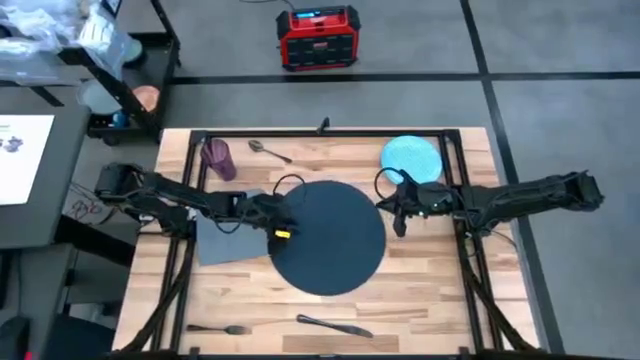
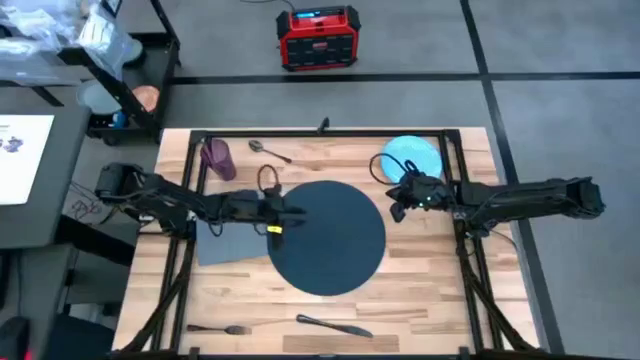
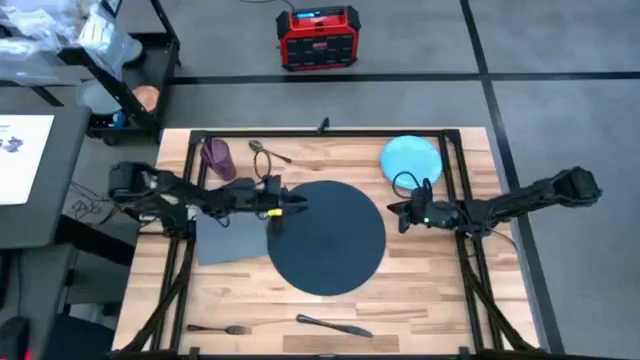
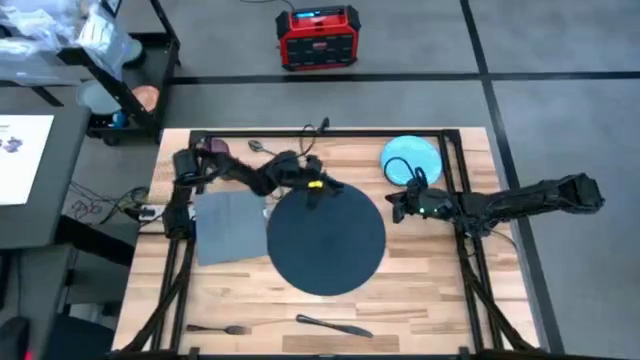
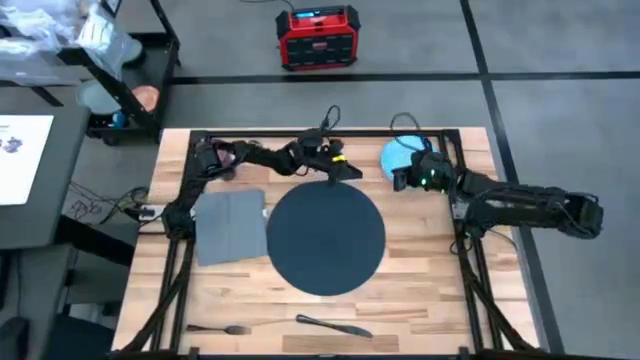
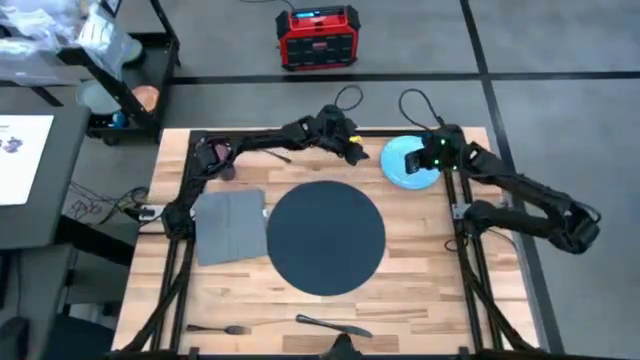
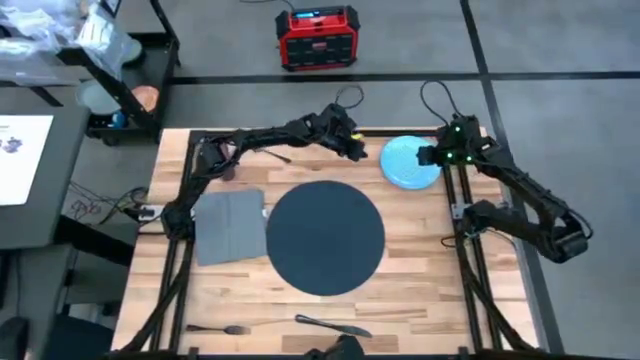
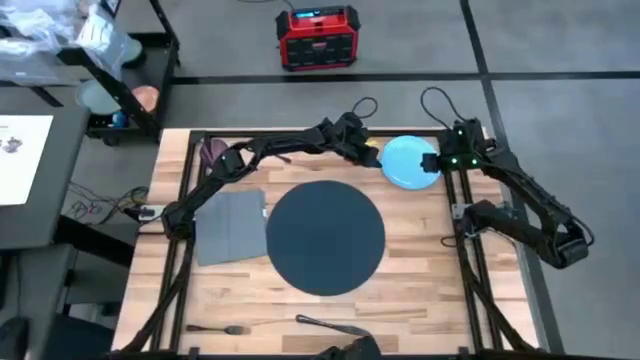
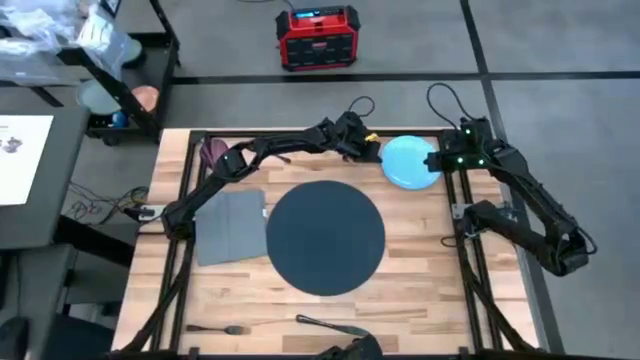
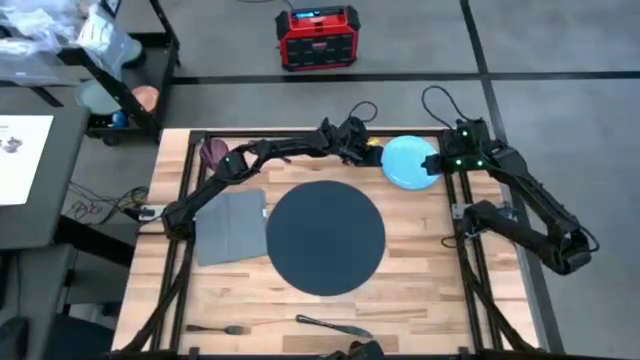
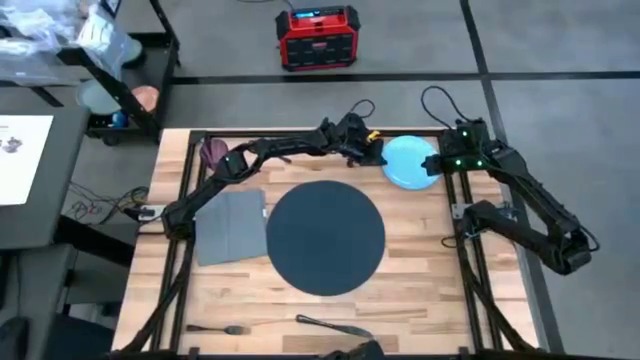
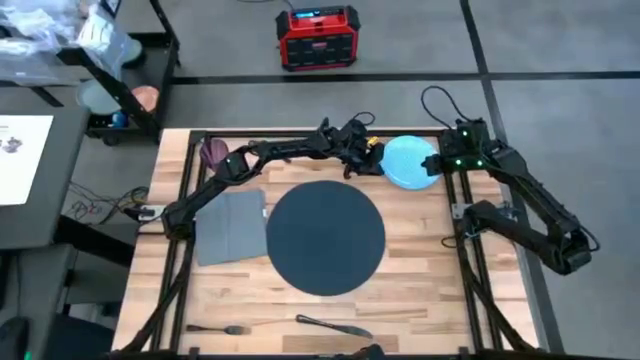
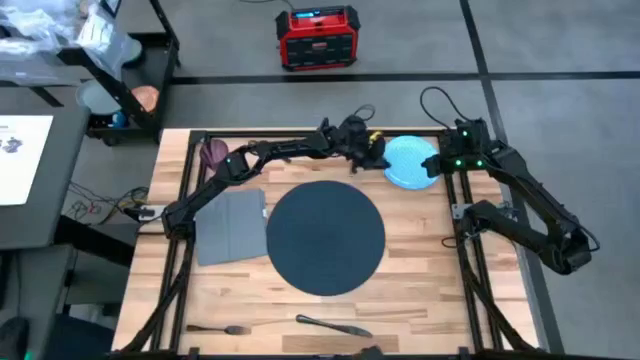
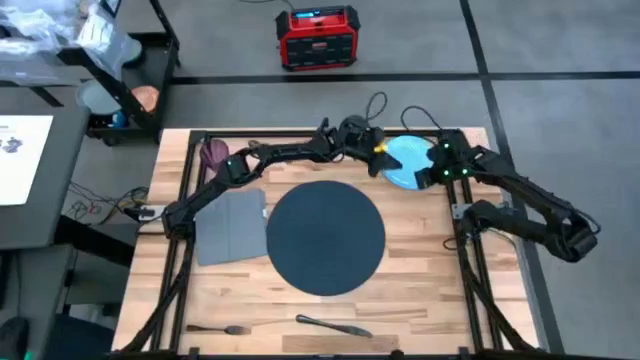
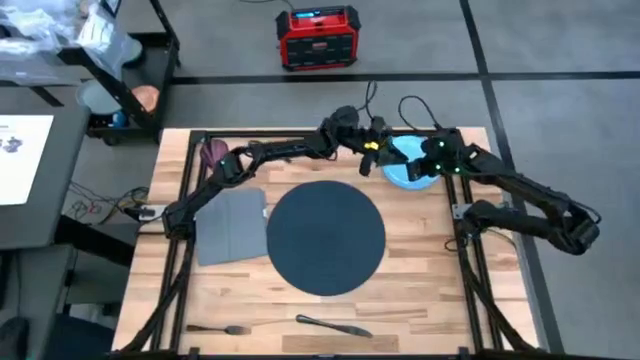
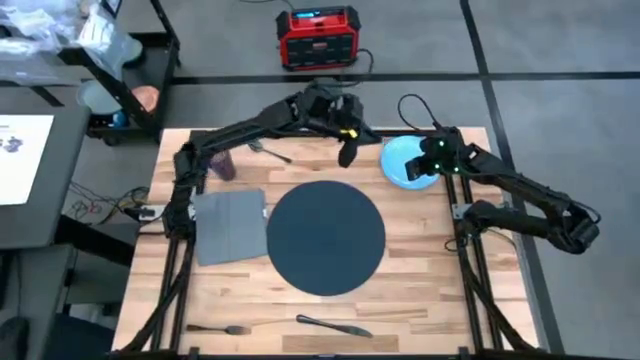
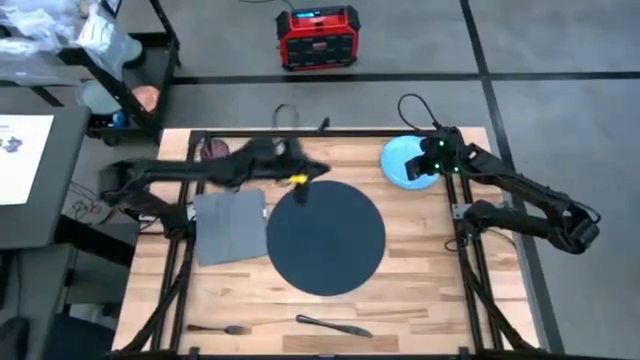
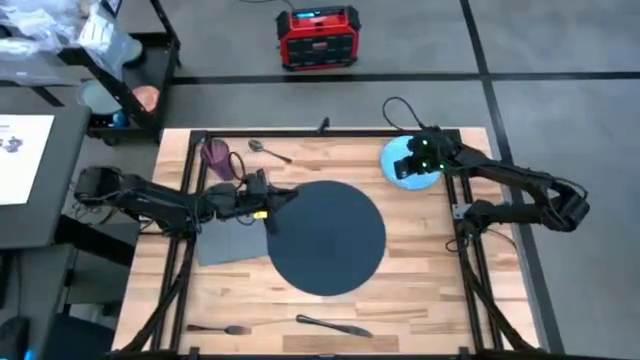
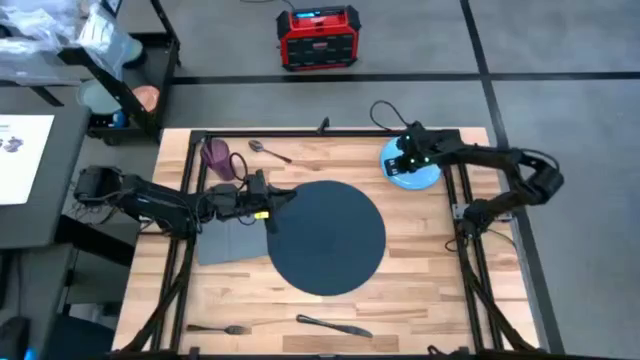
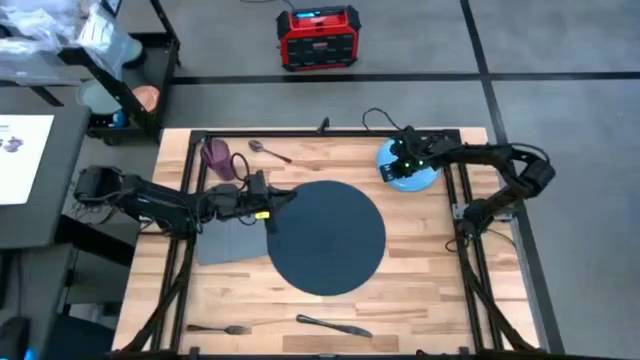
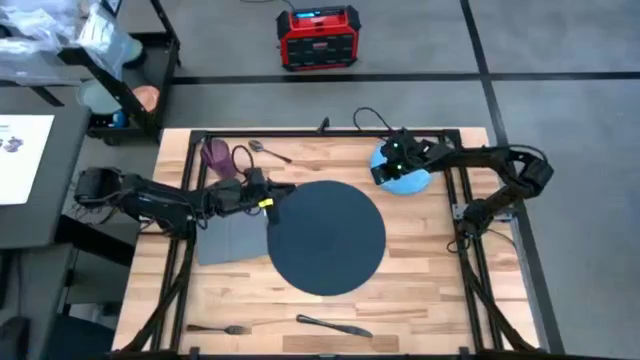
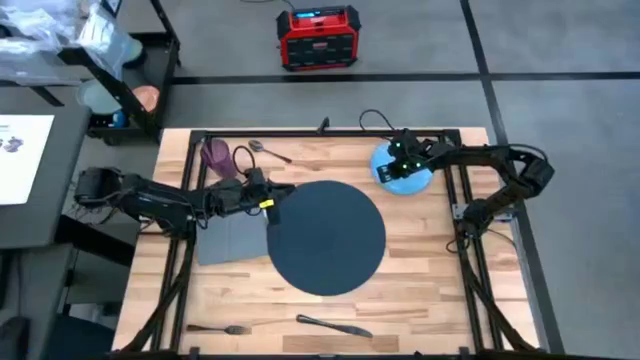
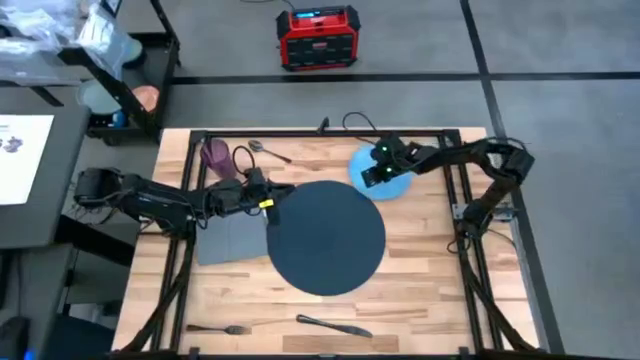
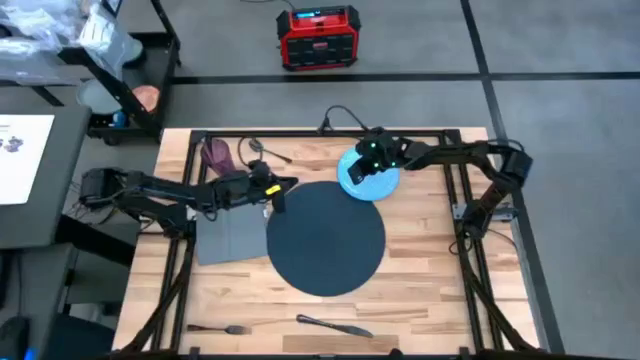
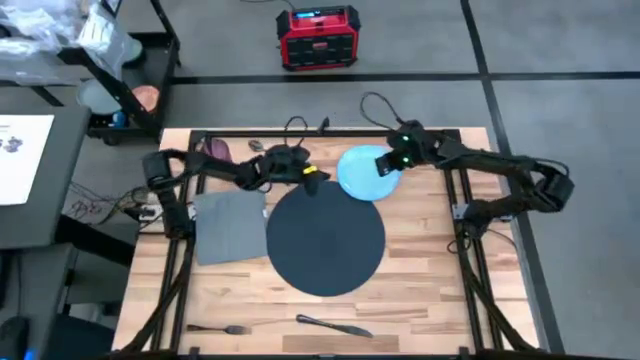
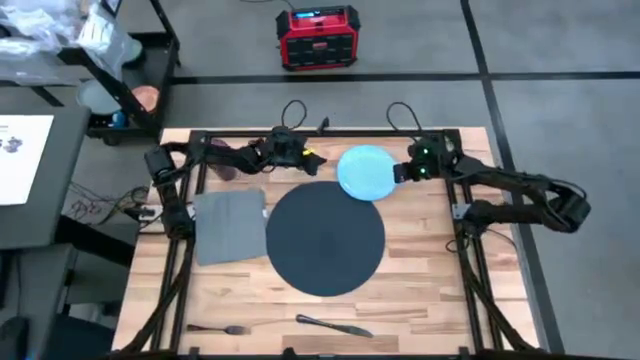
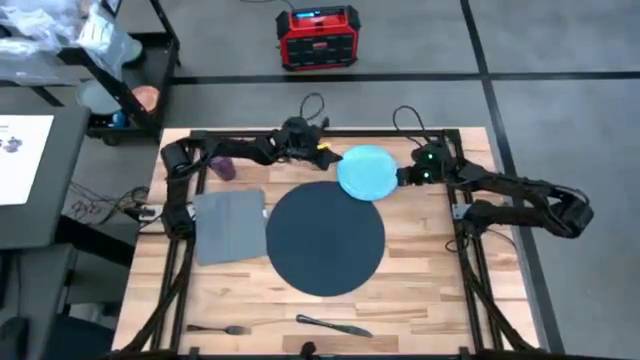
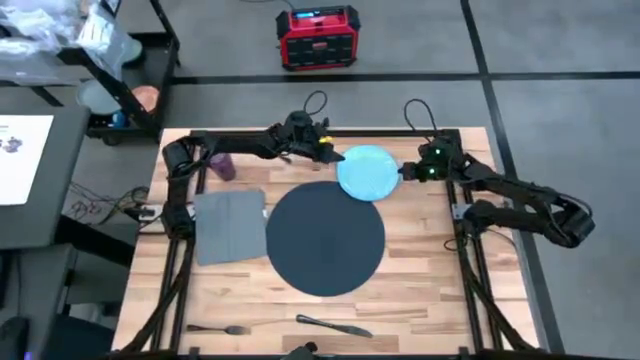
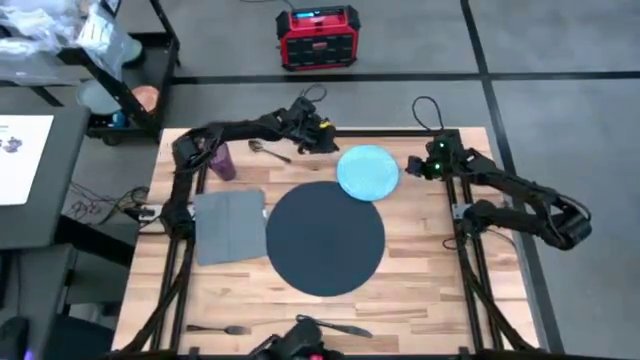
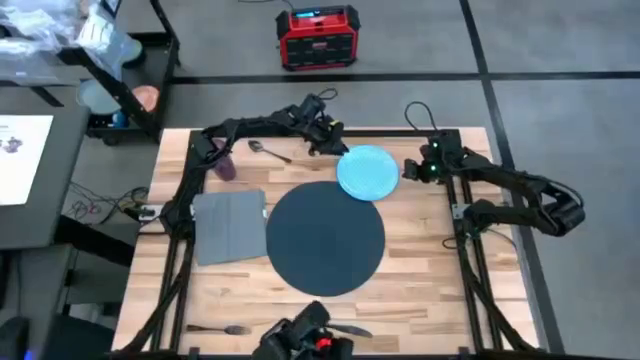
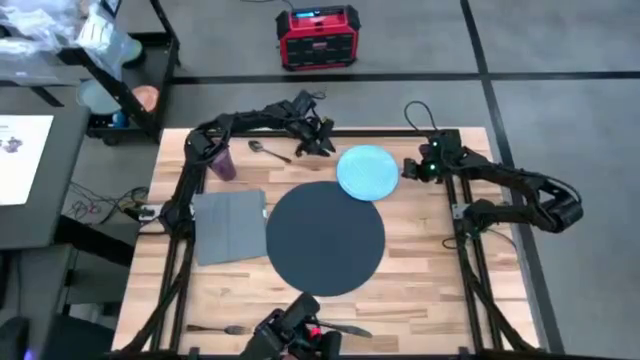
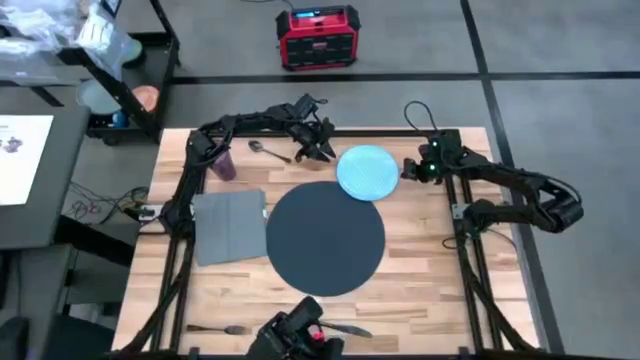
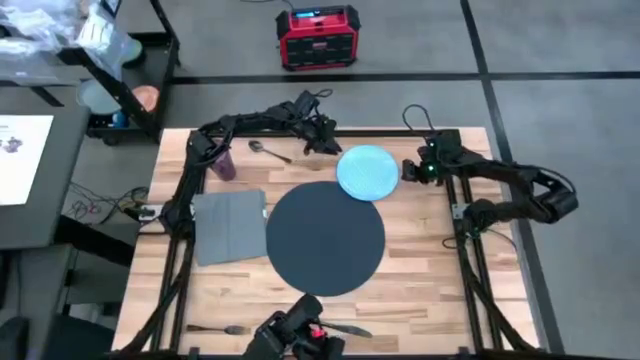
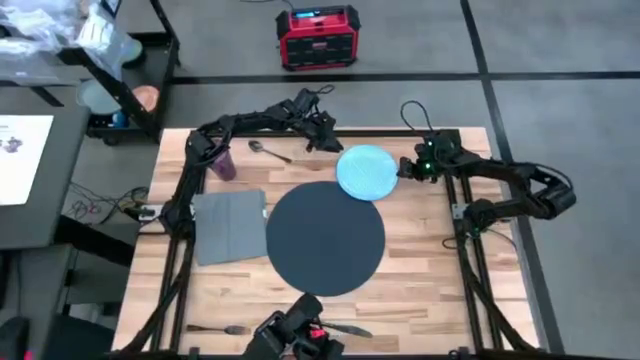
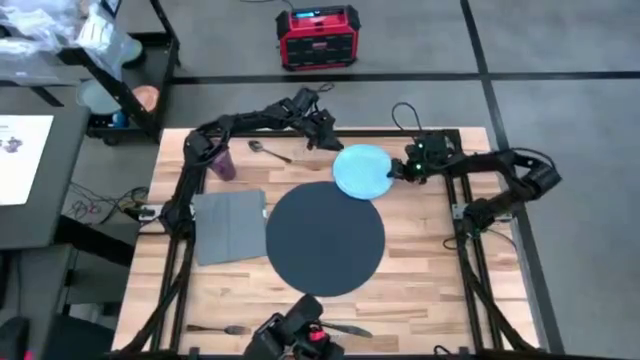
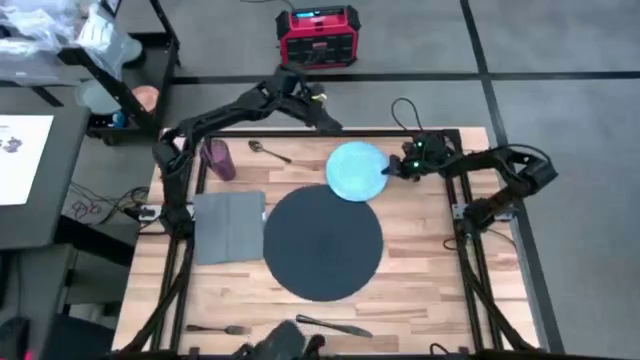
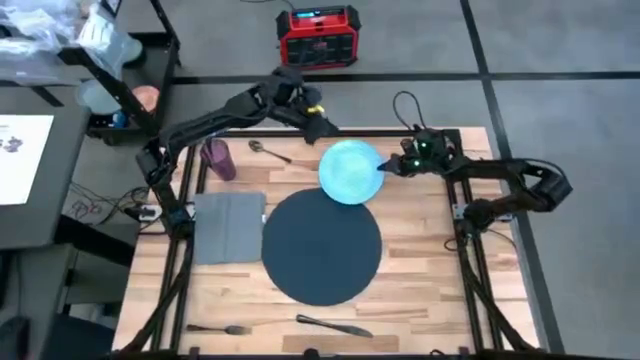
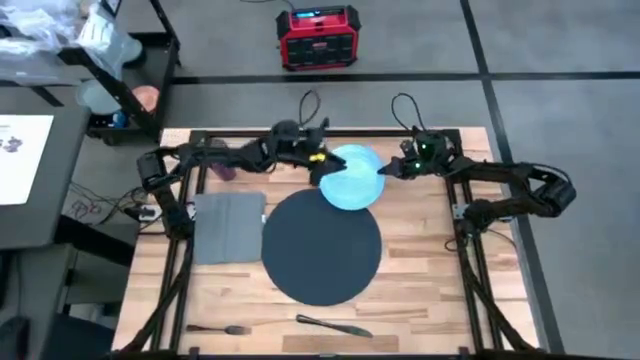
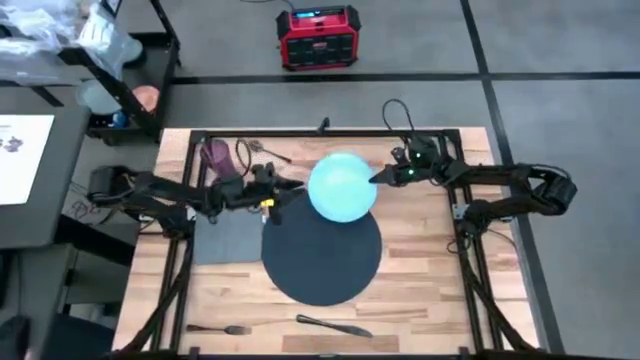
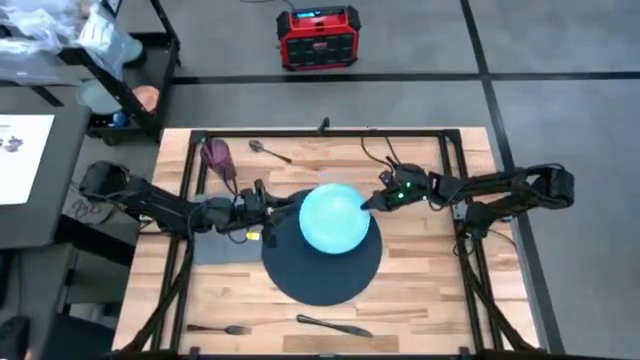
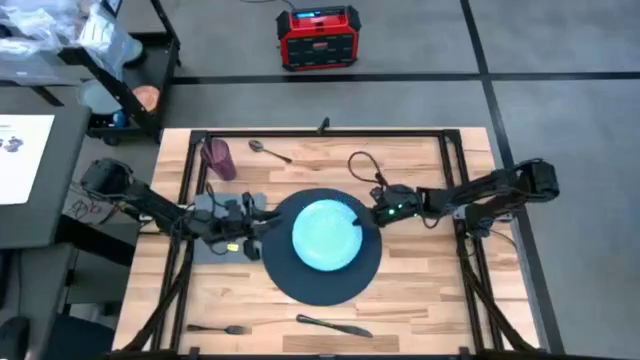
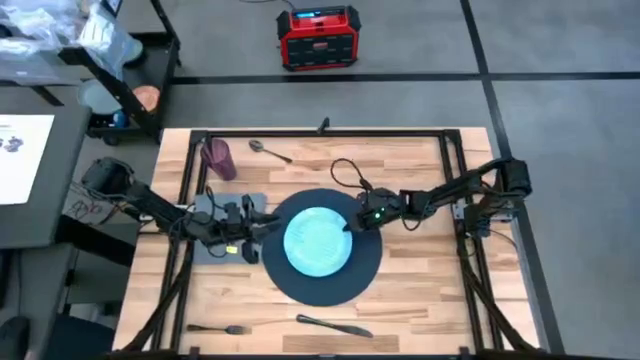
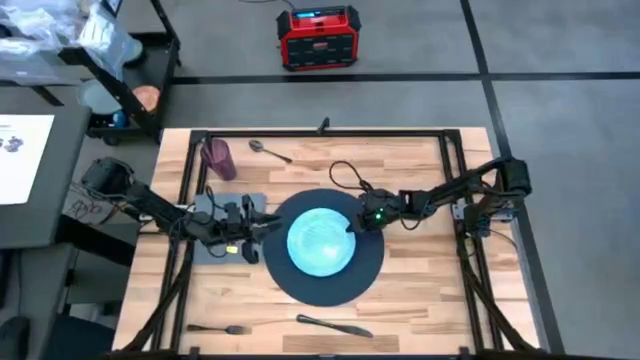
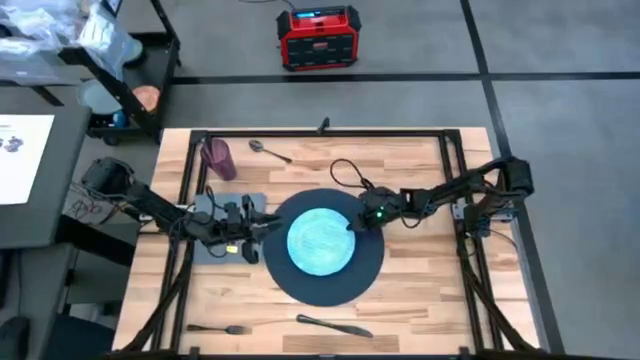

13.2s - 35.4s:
Task: Set table place
Put the blue patterned plate on the dark blue table mat

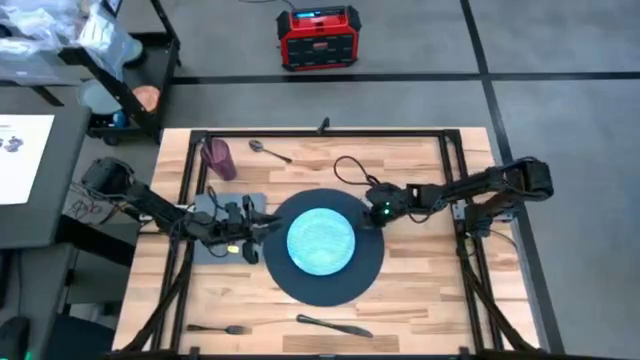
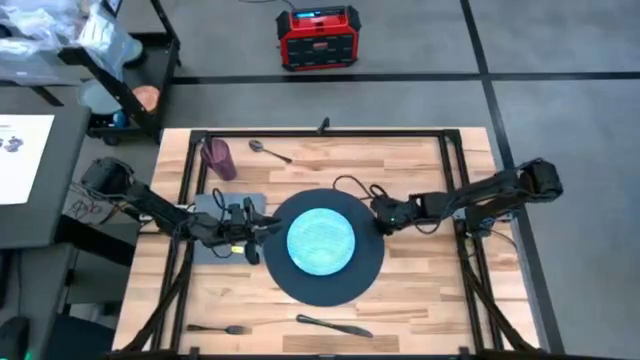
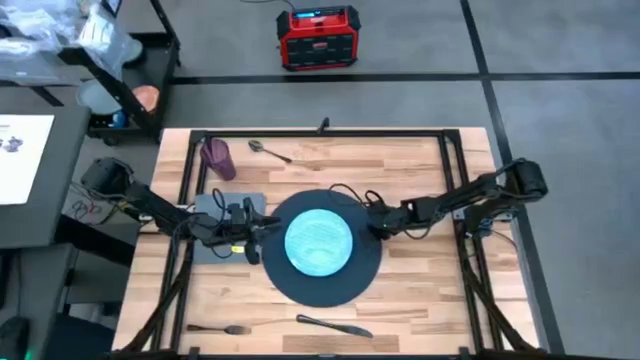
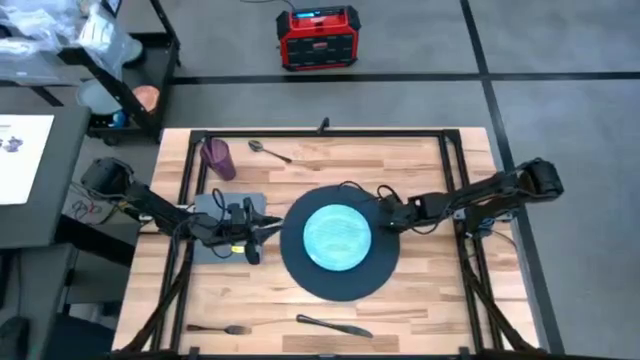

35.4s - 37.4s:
Adjust the dark blue table mat
